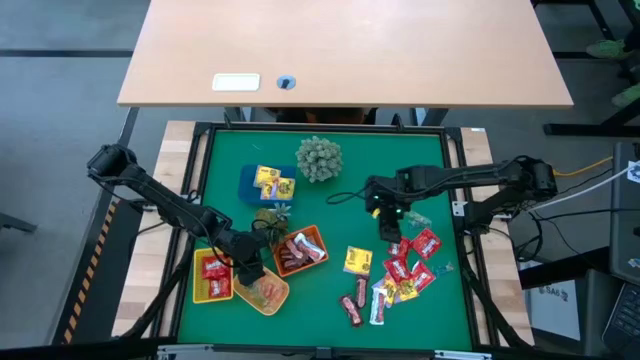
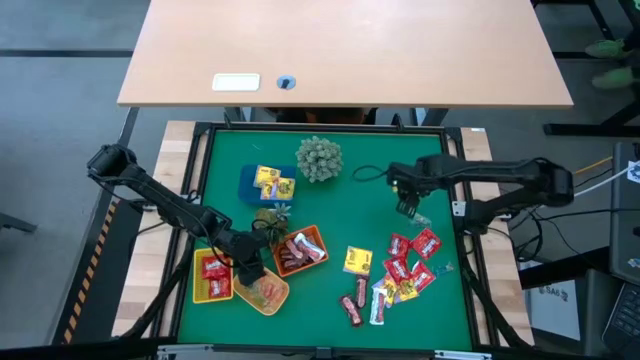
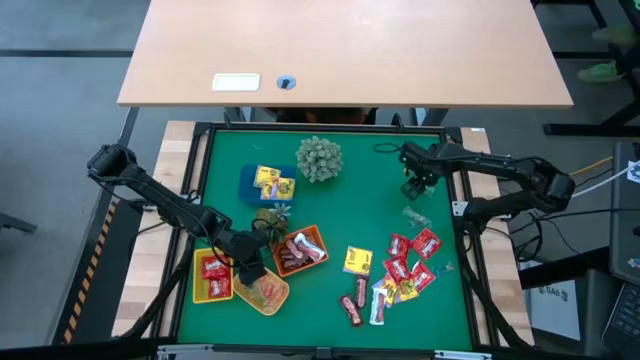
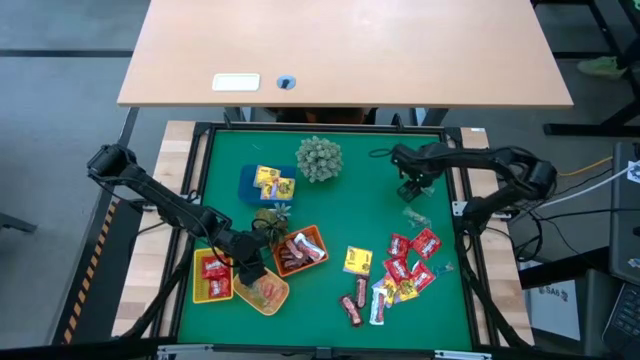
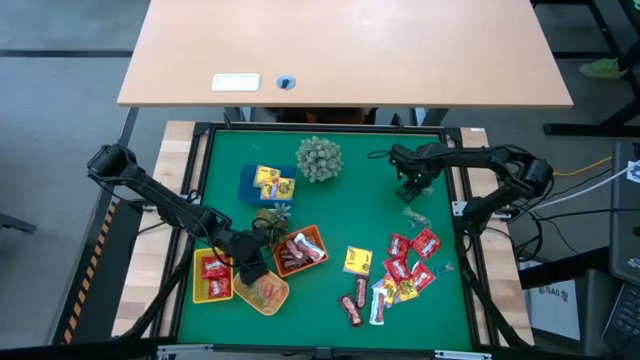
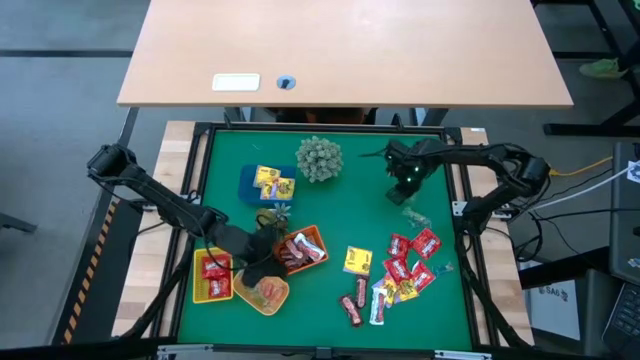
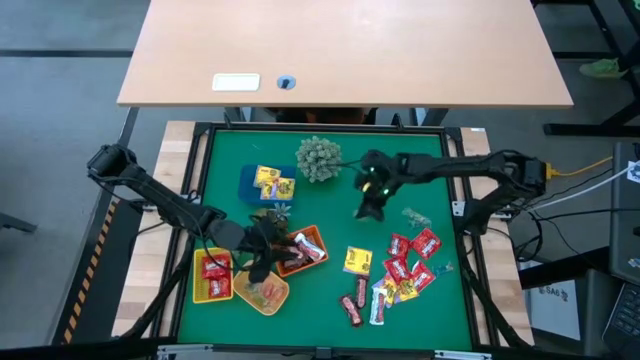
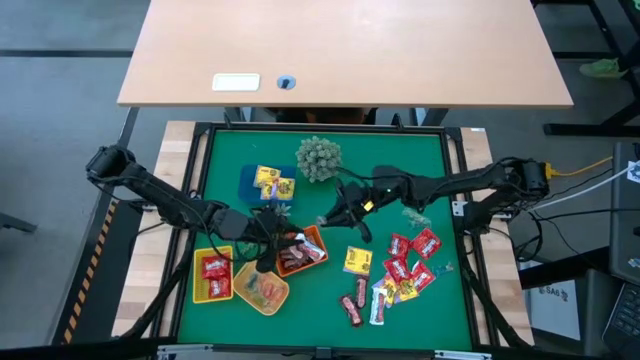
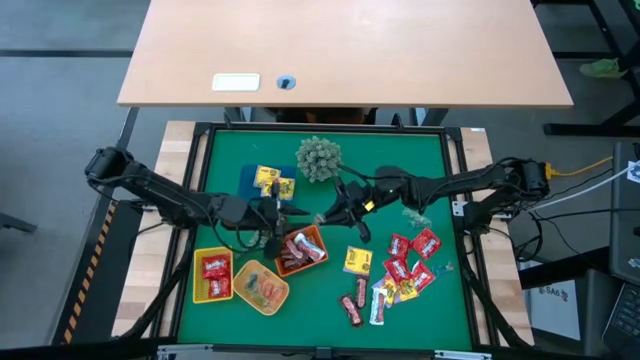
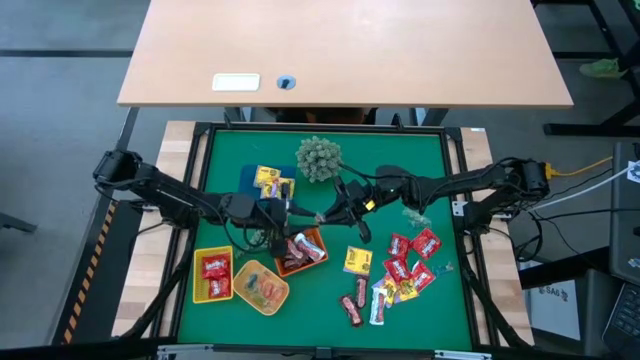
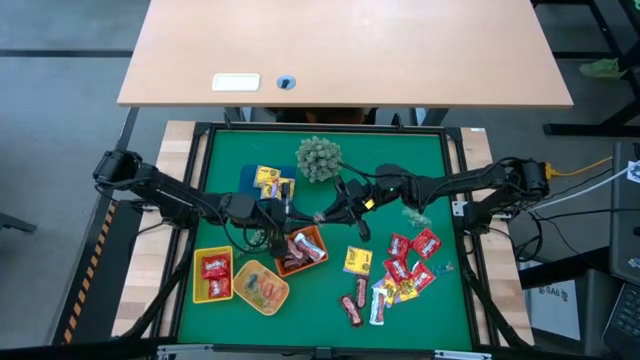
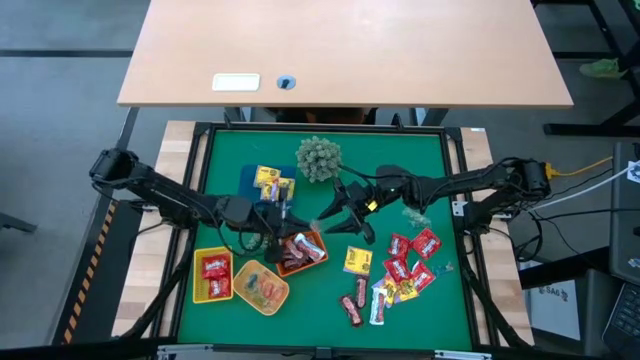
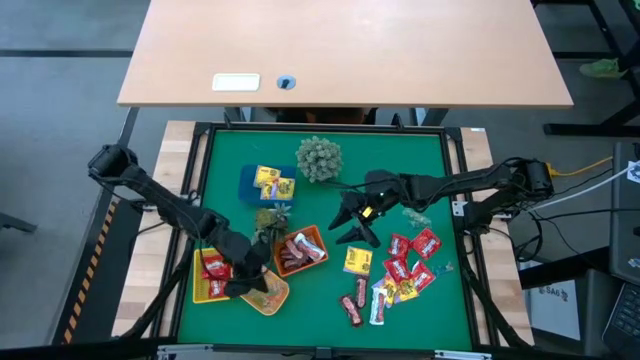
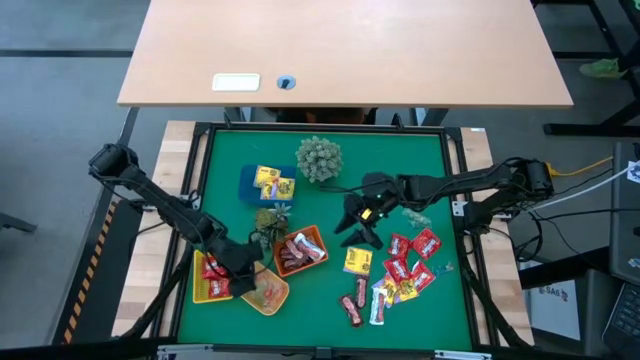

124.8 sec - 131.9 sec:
Task: Sort candy
Put the green gummy into the light orange bin

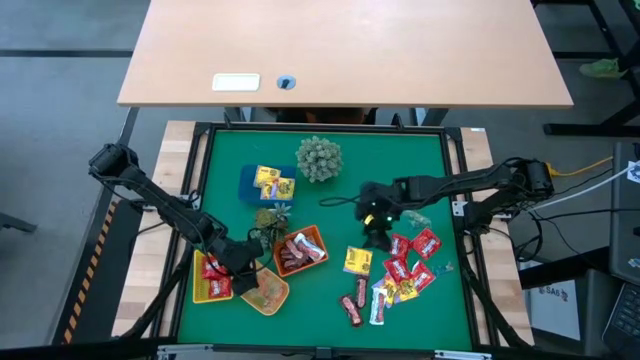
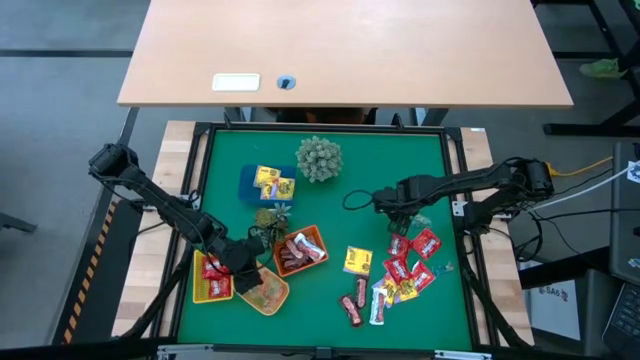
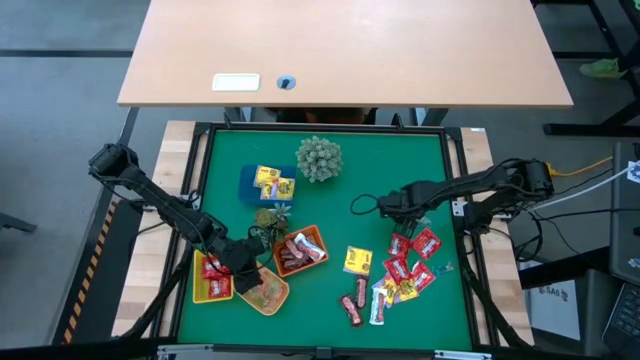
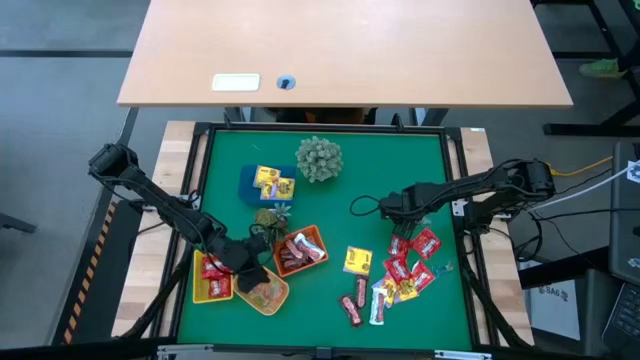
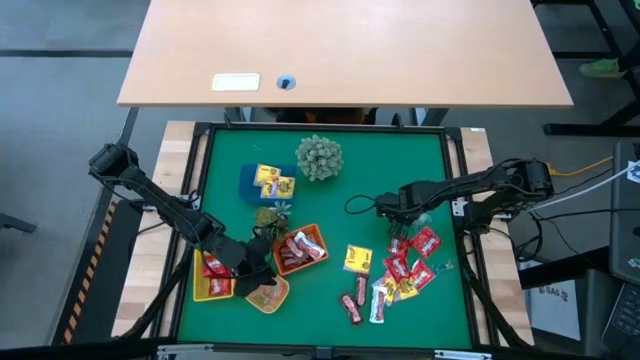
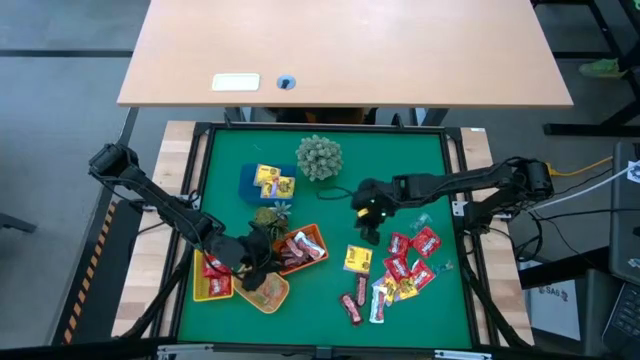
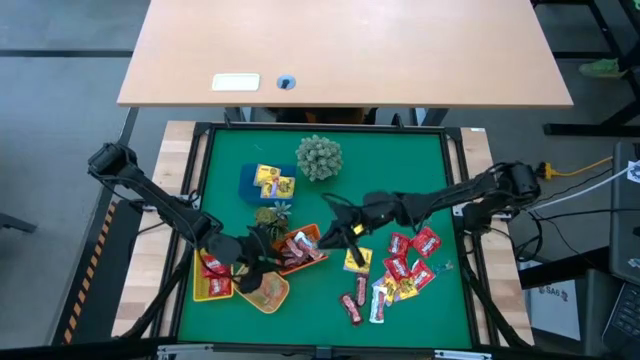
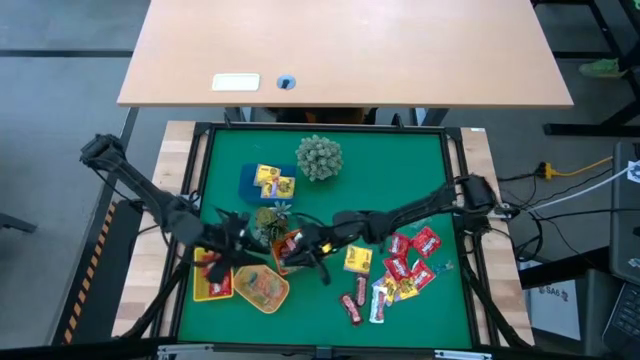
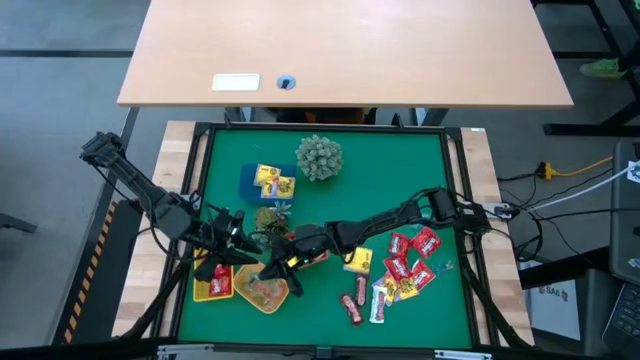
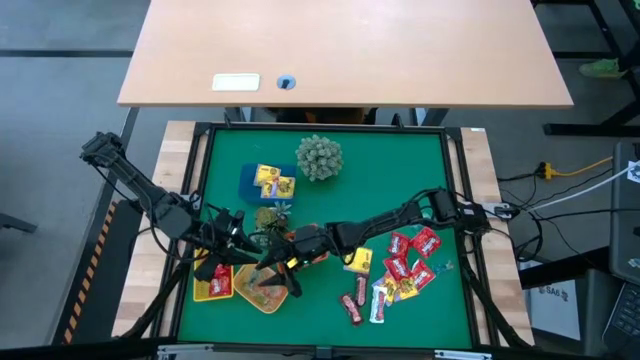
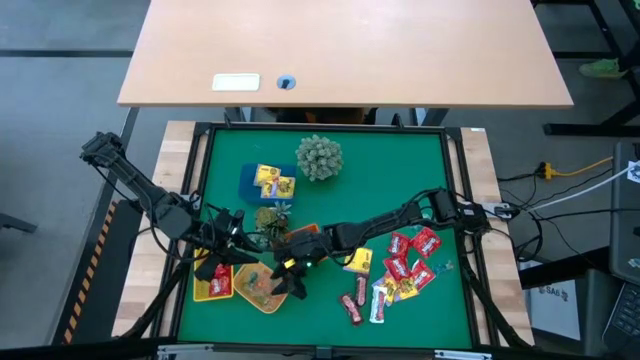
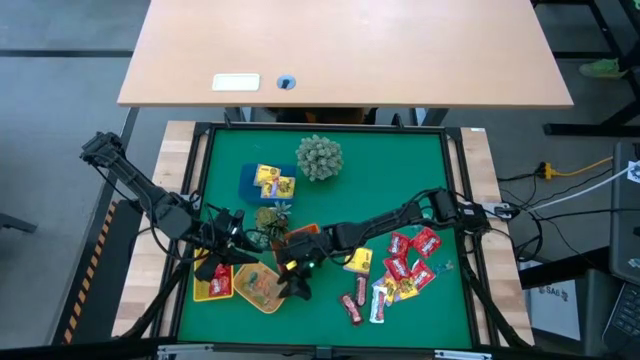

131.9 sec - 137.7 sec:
Put the green gummy into the light orange bin

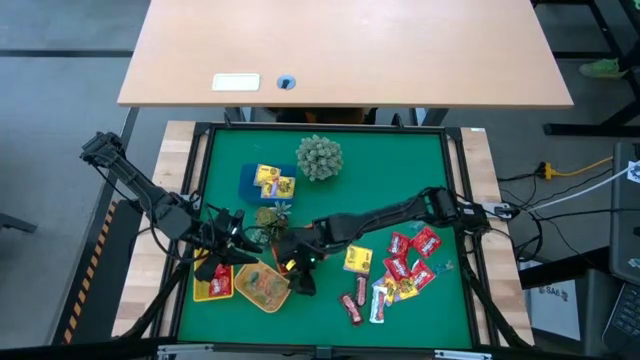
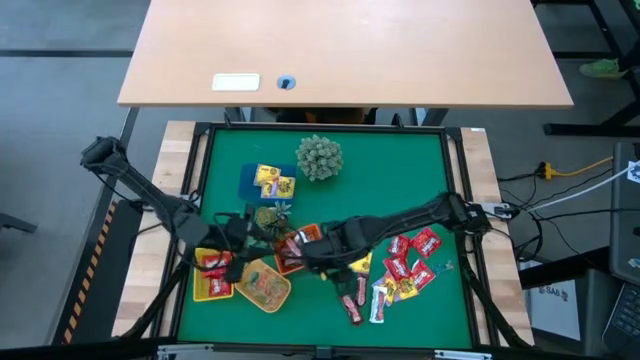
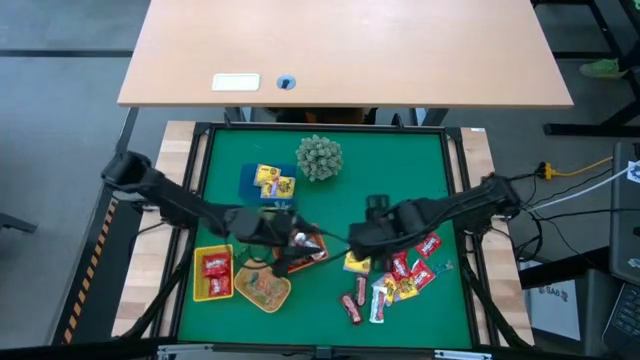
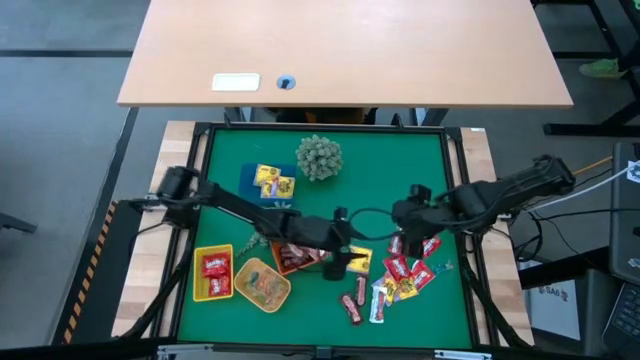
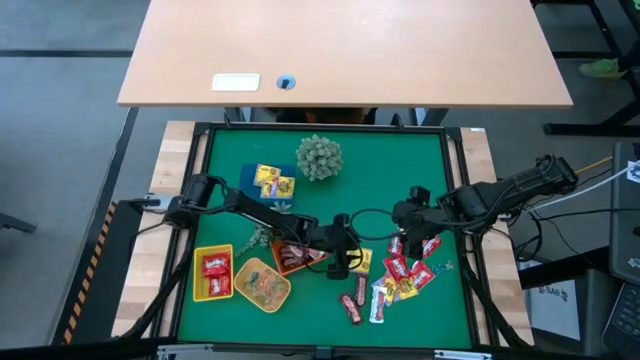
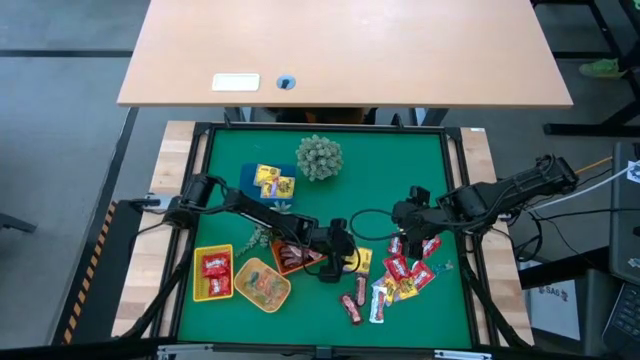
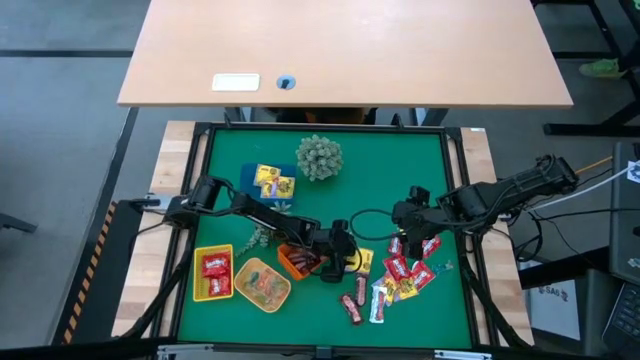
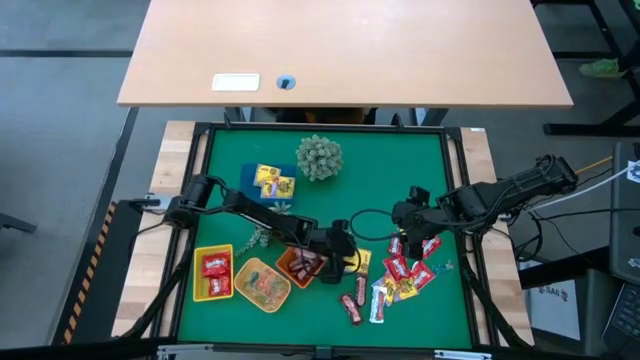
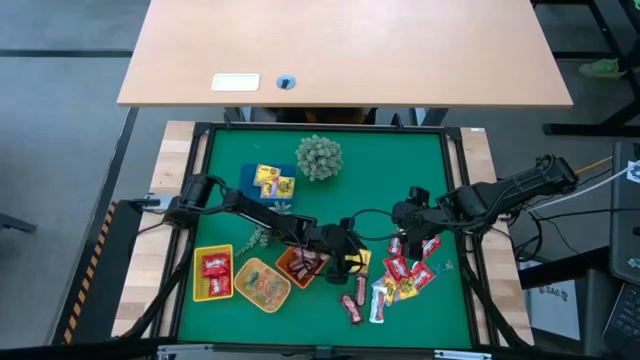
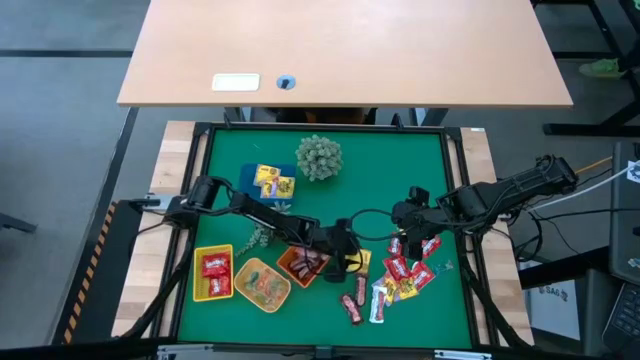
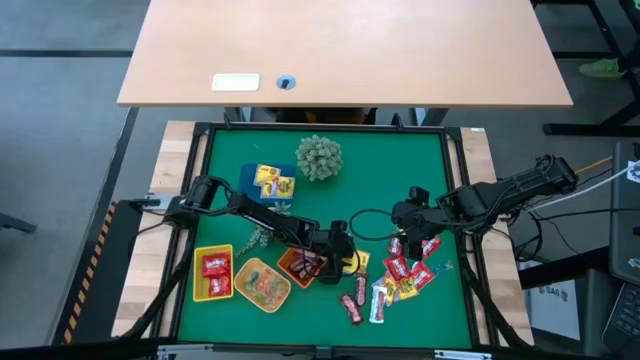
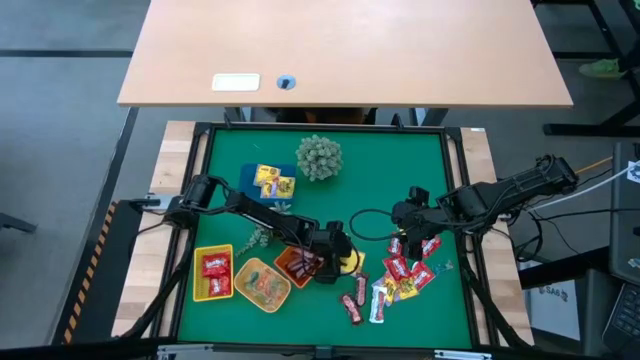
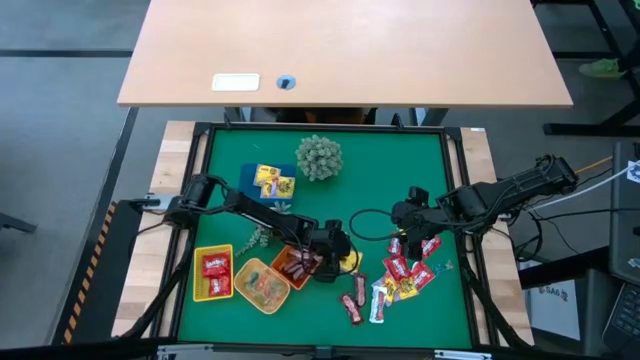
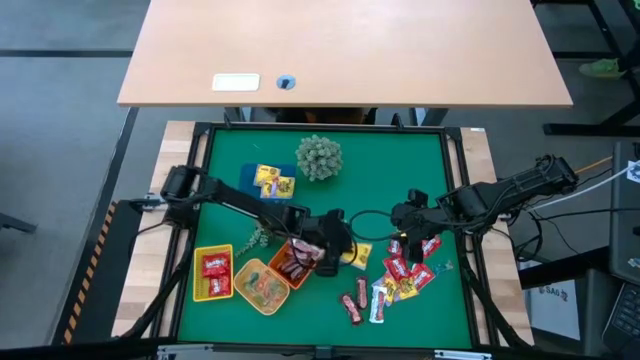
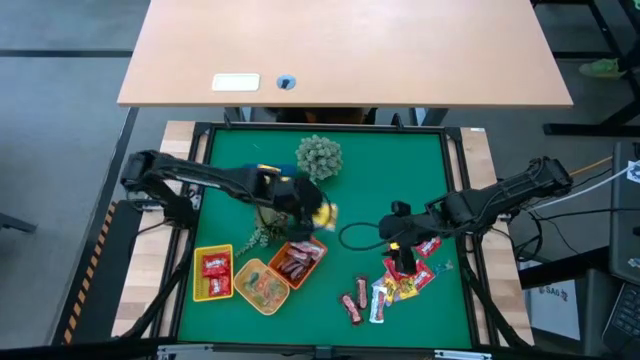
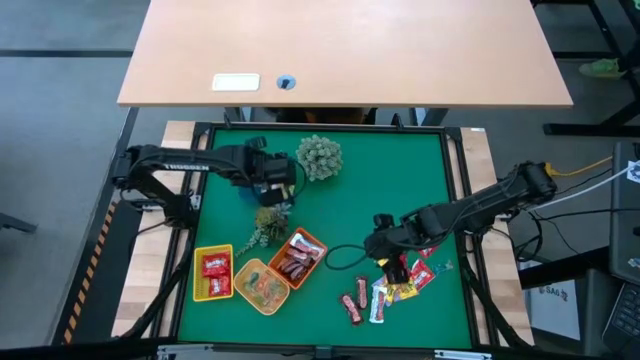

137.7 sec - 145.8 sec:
Put the yellow candy into the blue bin

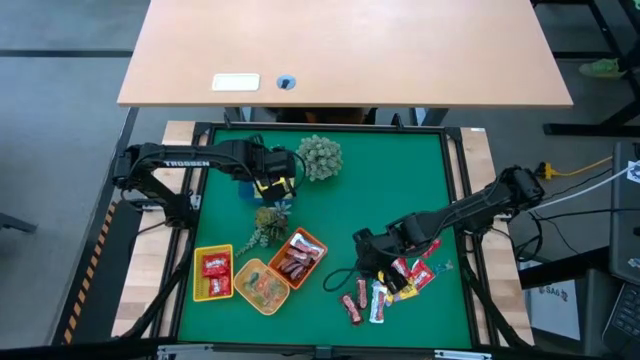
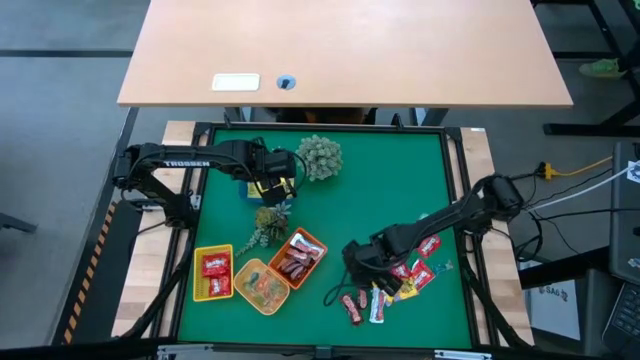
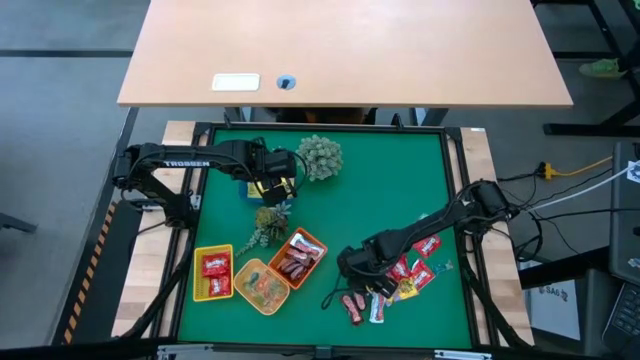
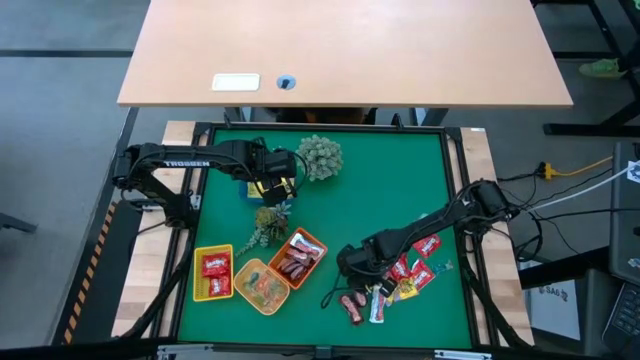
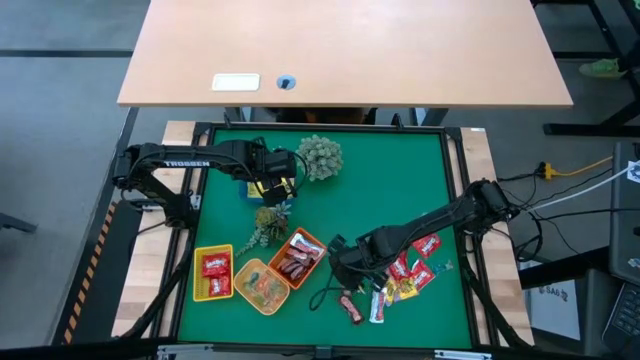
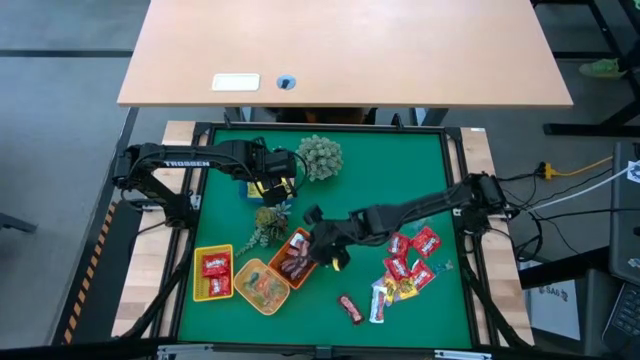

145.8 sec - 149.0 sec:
Put the brown chocolate into the orange bin
